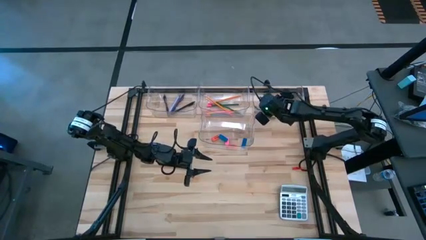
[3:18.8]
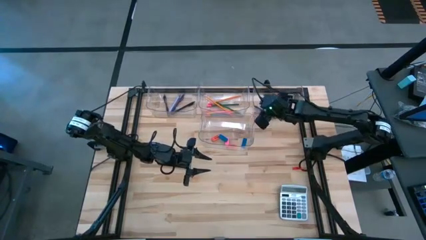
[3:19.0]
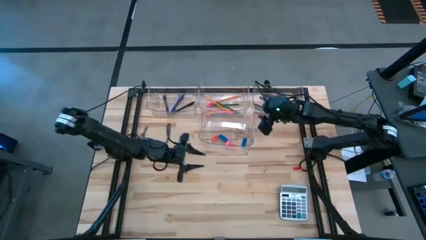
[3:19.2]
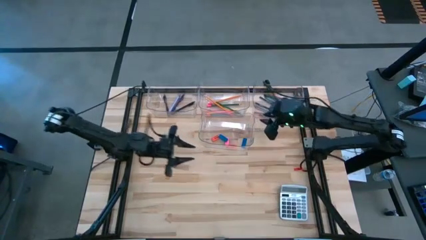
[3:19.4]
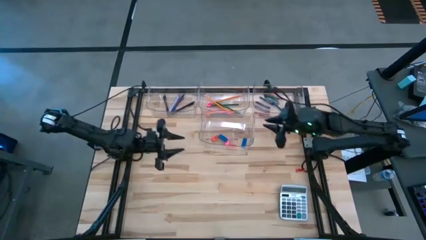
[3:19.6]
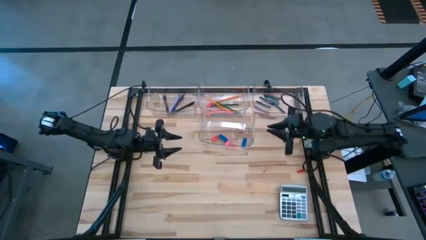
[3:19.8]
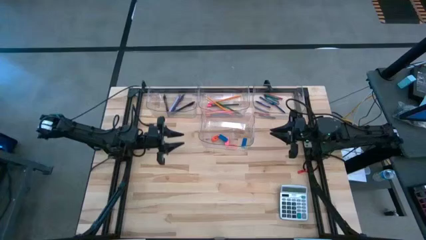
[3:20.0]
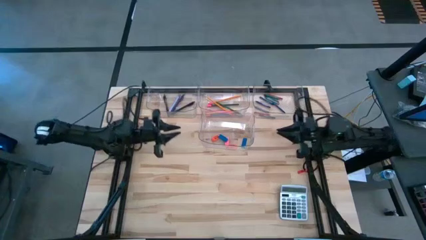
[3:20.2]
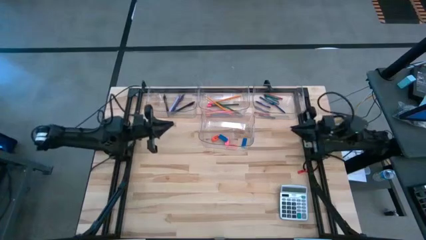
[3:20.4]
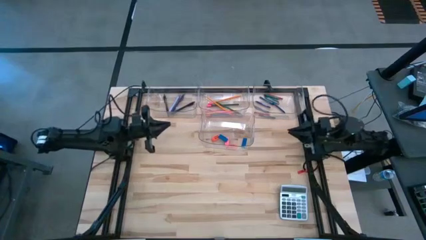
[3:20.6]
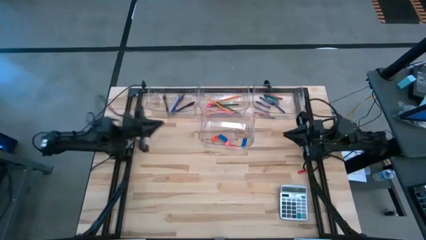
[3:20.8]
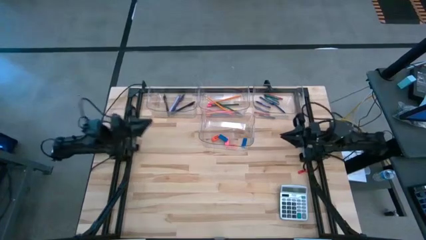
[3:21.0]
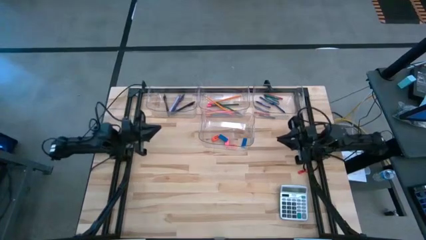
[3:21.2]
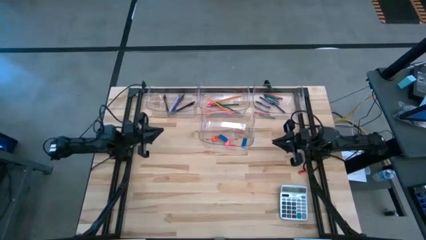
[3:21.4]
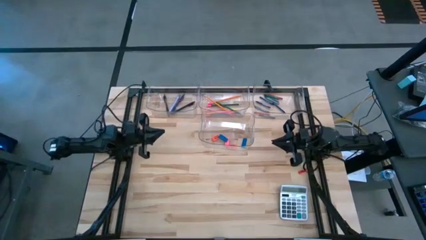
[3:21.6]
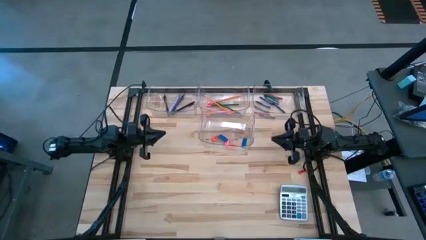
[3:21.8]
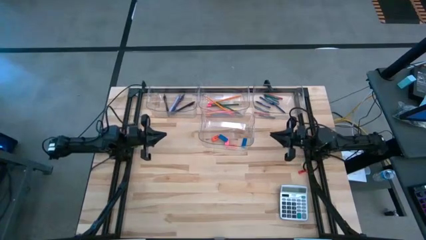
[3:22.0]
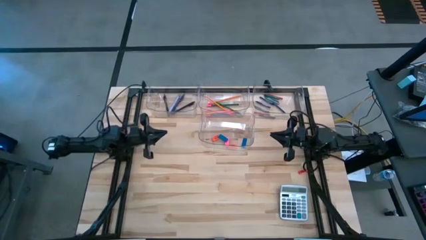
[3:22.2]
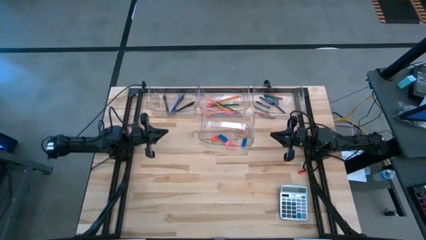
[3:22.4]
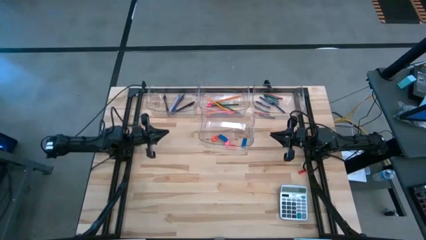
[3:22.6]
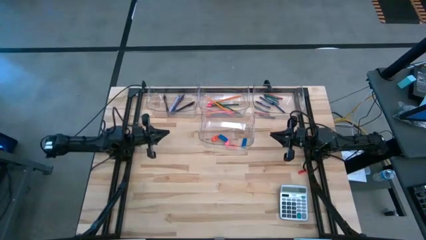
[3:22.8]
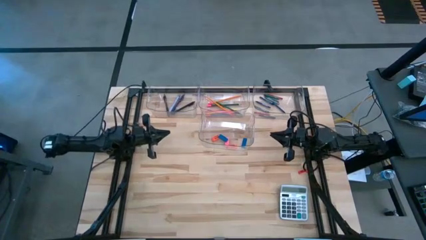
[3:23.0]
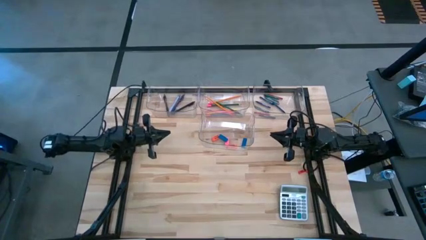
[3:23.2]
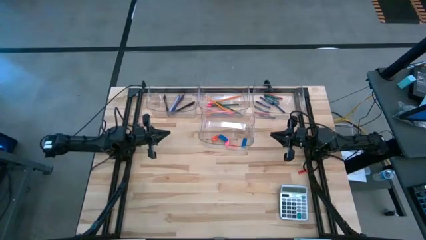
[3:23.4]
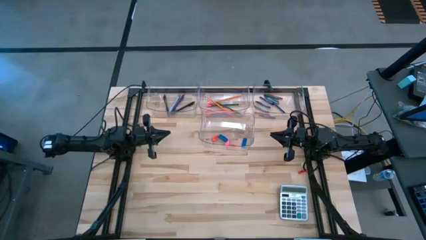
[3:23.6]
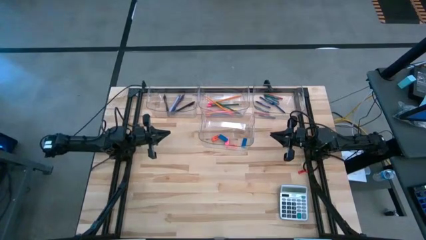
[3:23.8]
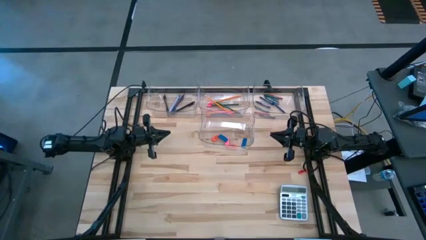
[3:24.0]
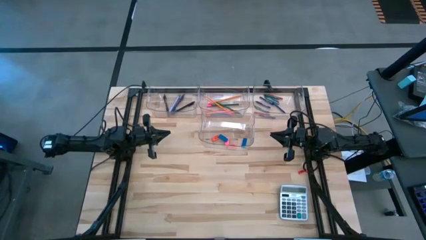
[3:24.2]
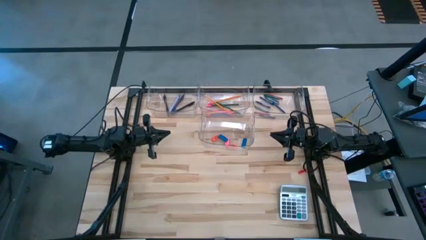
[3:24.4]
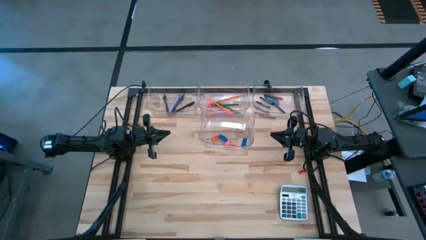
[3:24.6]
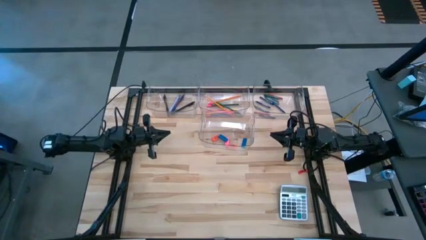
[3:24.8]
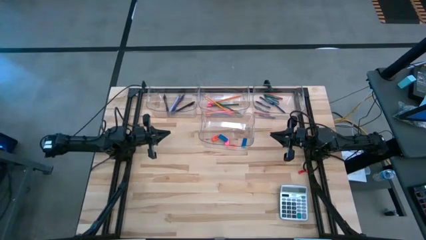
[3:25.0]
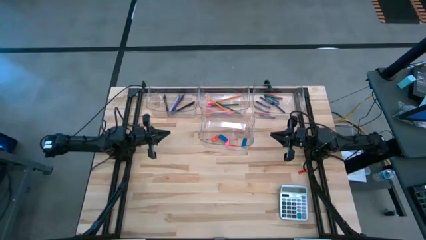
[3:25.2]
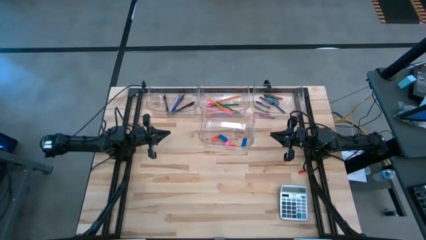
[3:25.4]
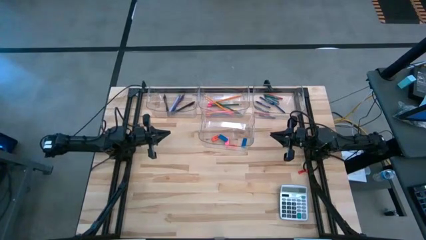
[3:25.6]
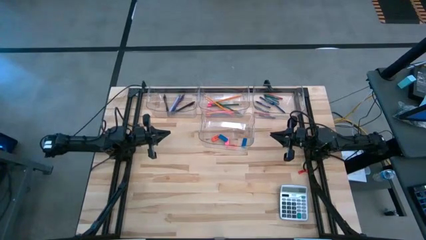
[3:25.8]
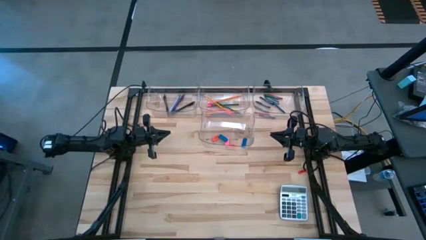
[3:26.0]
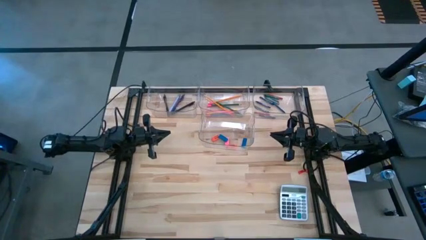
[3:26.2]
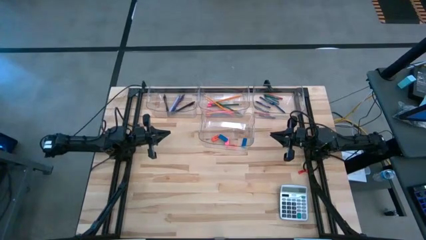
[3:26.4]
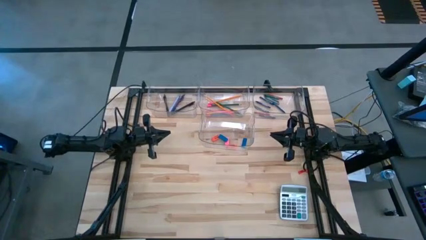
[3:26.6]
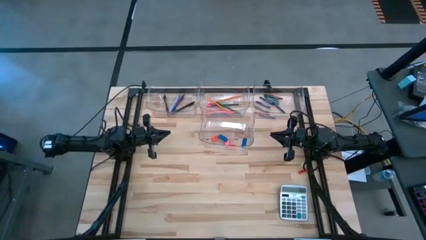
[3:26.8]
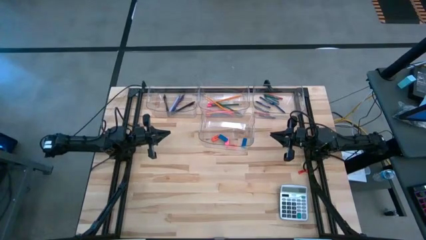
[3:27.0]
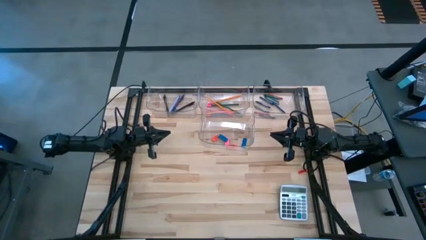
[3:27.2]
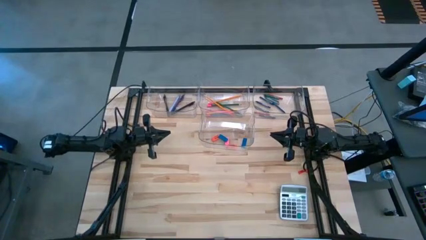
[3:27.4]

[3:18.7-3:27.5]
Task: Sort crayons/erasers/pens/pencils in bins
Return to Home Position

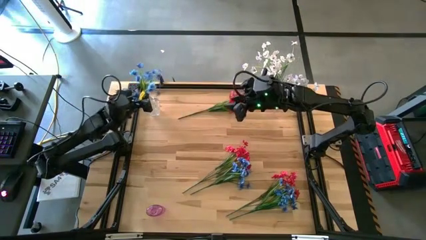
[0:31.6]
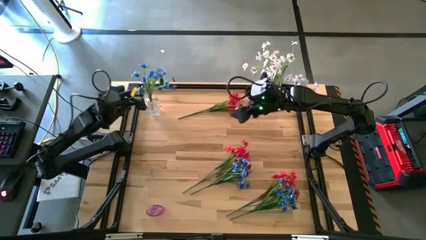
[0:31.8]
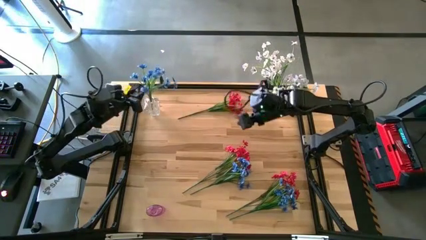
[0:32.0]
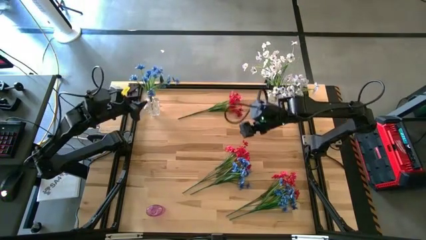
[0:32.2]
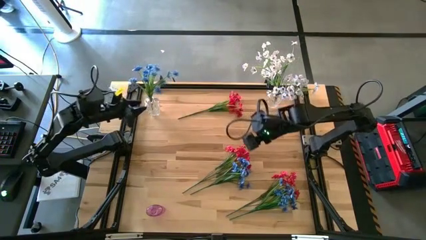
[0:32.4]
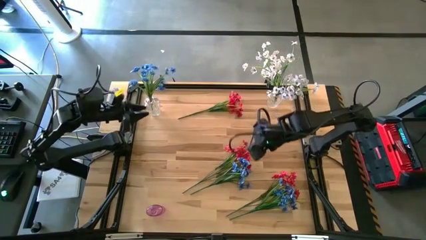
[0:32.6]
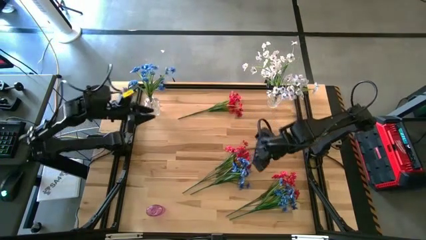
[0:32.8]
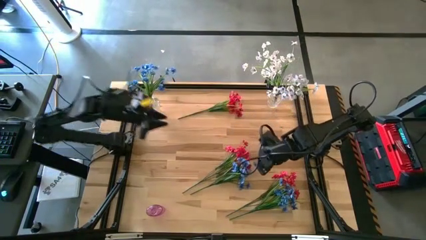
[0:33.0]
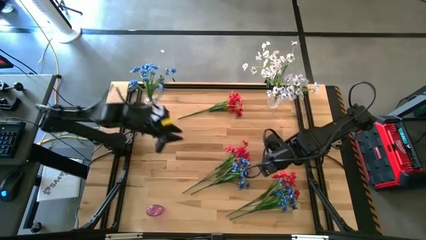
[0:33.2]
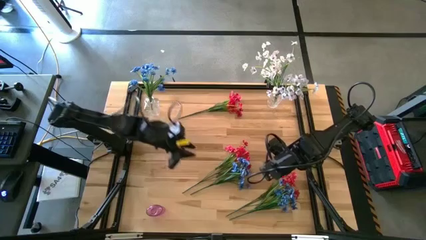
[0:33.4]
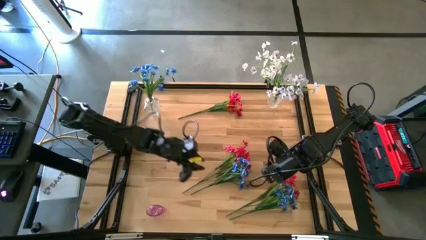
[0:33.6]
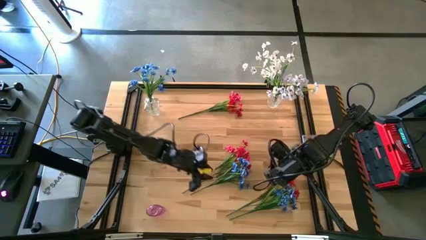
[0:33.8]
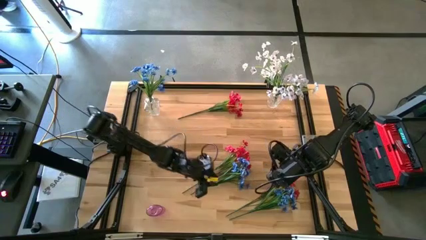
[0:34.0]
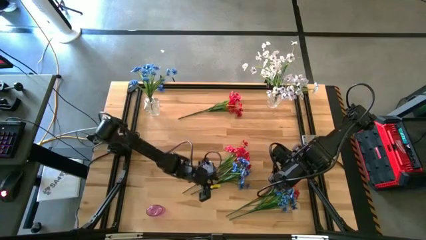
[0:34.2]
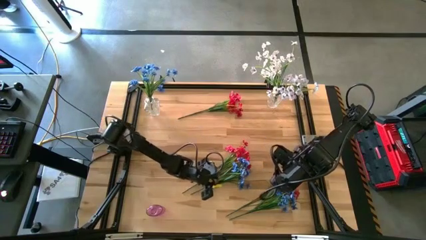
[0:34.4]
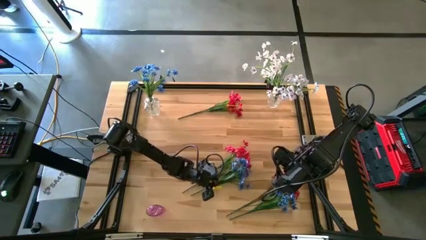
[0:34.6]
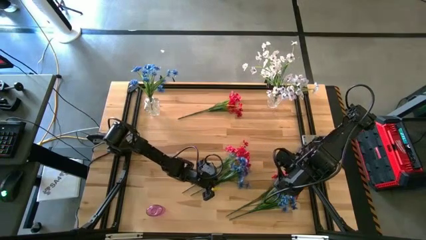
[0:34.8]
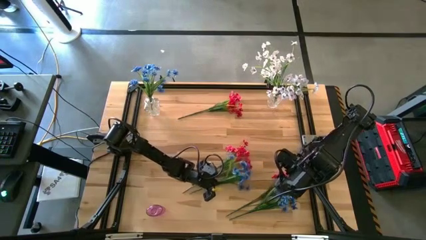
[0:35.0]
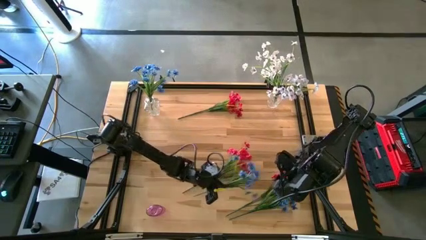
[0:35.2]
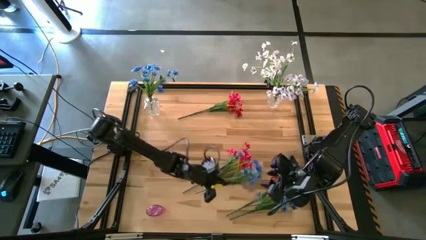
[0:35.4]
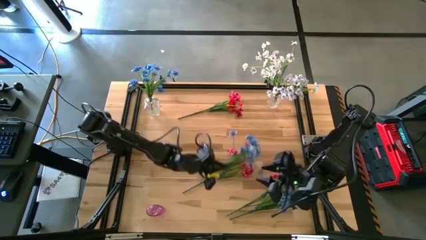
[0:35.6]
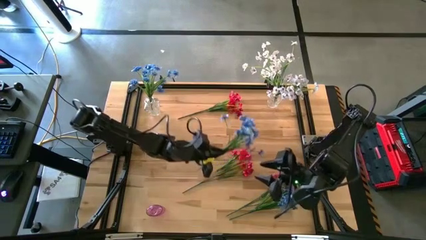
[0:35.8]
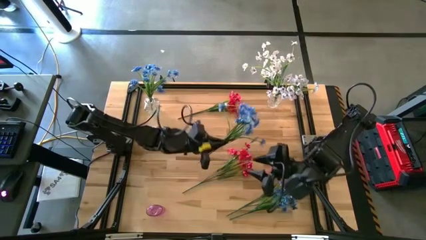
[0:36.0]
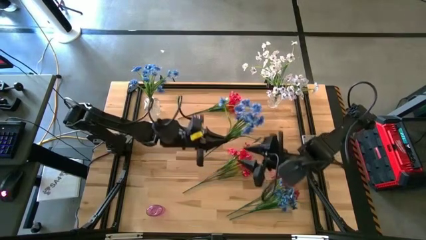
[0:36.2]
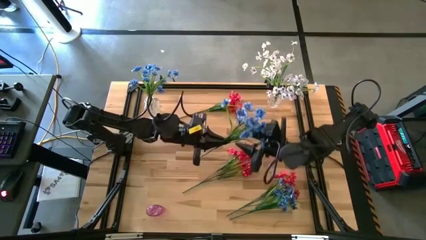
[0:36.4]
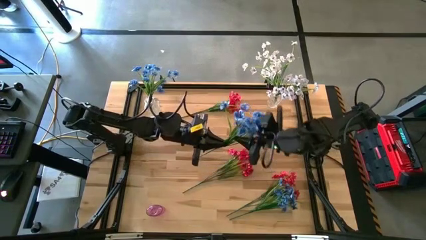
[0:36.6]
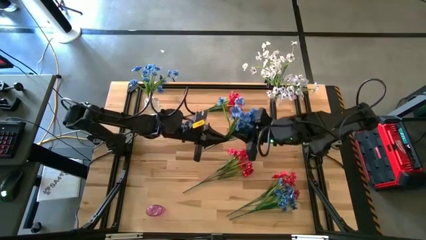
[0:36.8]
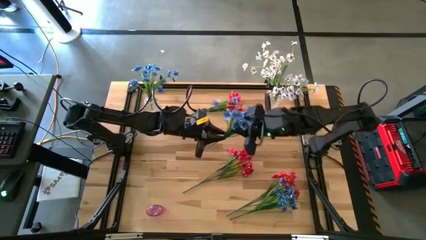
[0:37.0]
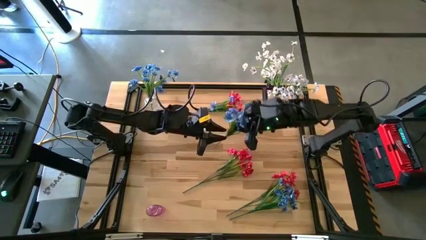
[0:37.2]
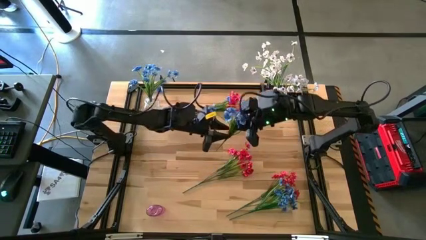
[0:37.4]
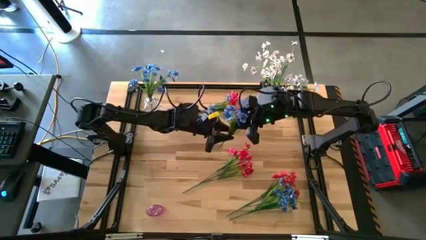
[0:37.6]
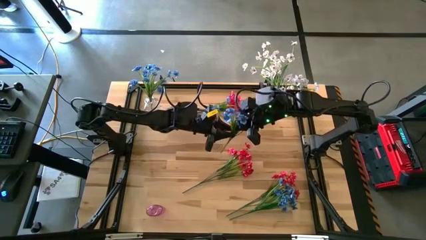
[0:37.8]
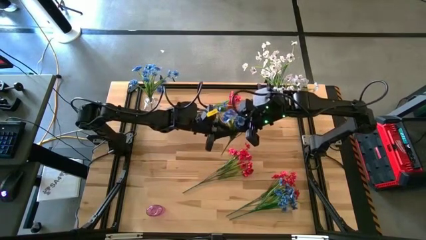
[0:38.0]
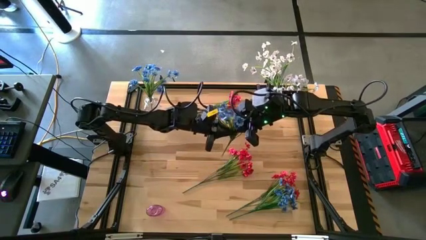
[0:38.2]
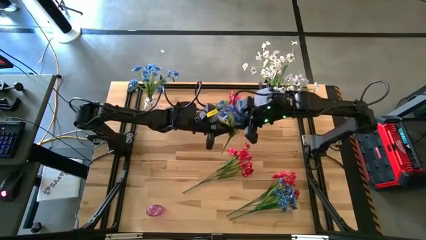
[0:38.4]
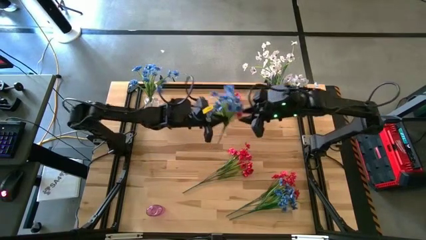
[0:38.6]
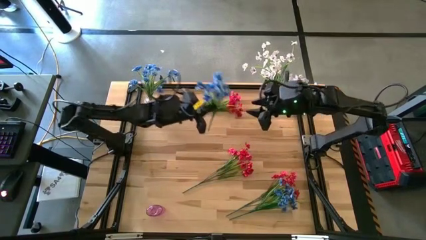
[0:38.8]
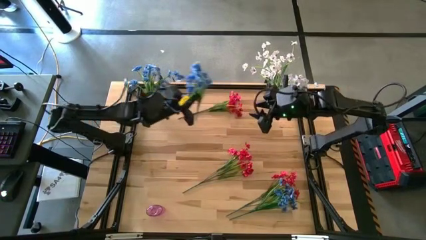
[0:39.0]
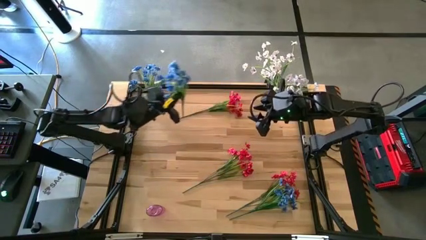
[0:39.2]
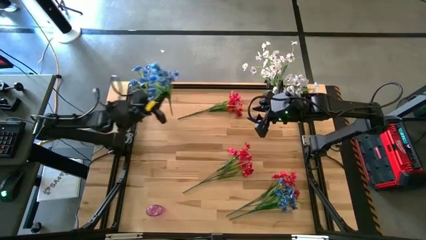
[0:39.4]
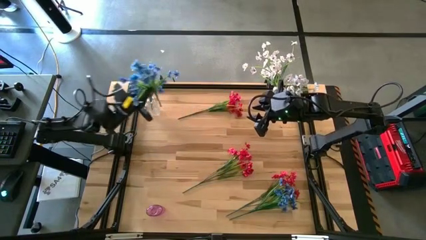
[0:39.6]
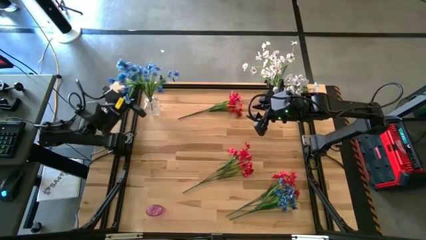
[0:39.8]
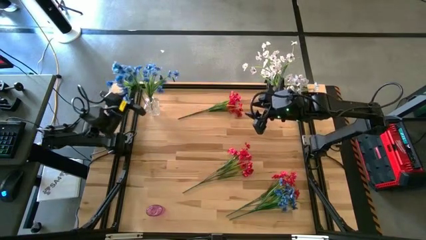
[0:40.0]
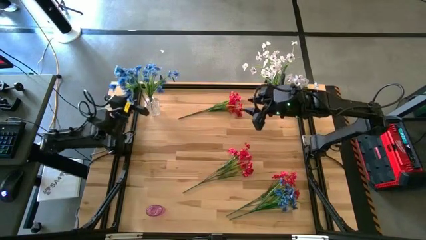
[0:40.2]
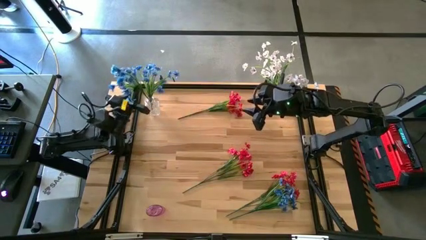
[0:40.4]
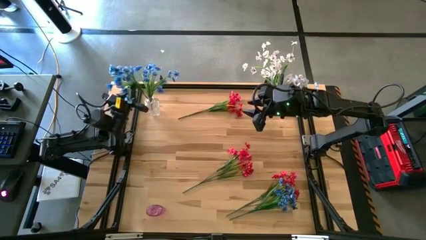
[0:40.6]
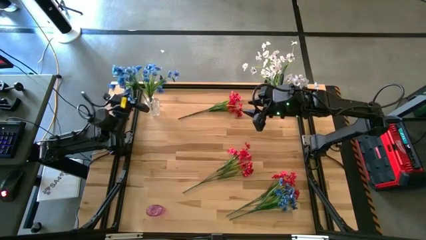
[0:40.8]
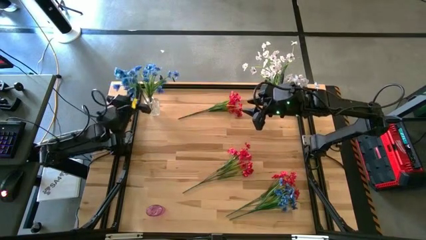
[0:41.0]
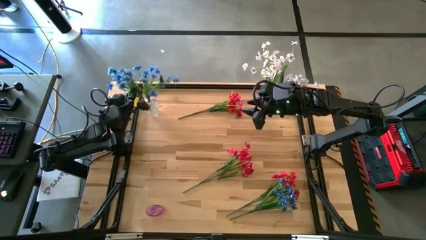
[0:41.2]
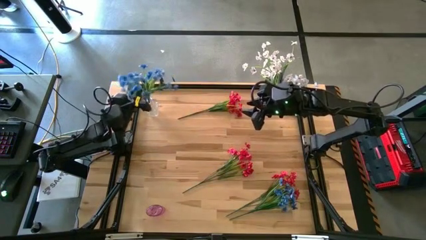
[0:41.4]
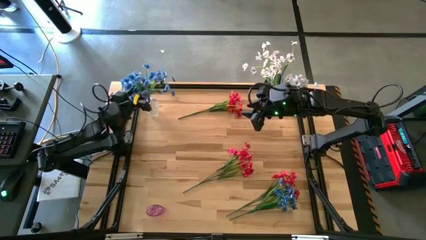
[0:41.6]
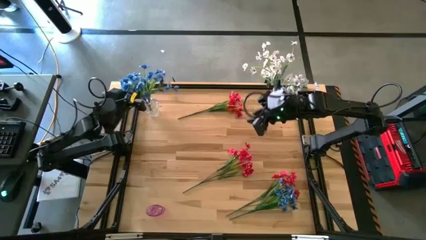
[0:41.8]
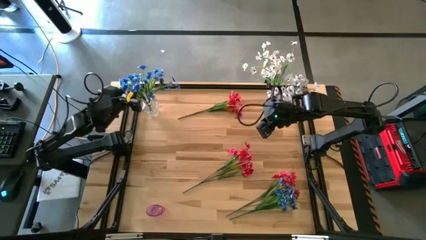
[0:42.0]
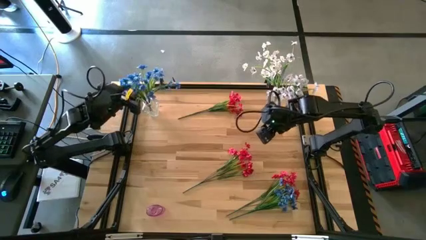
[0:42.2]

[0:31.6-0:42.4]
Task: Sort flowers into vase by color
Put the top blue flowers into the left transparent vase
